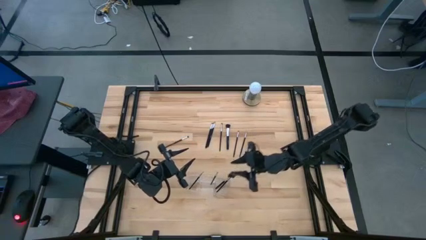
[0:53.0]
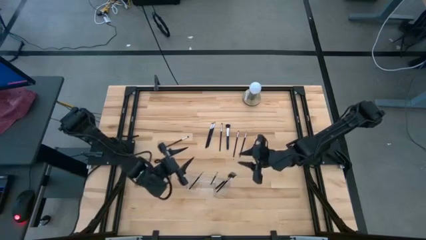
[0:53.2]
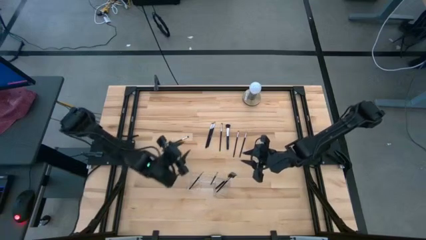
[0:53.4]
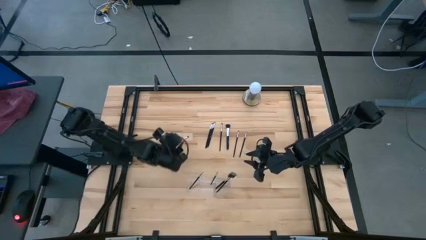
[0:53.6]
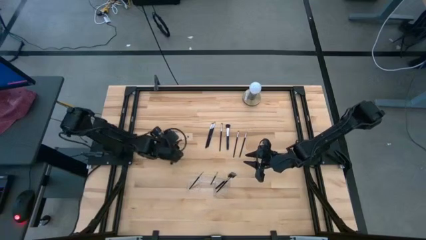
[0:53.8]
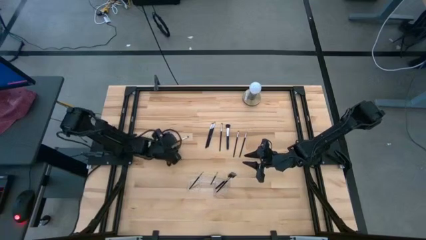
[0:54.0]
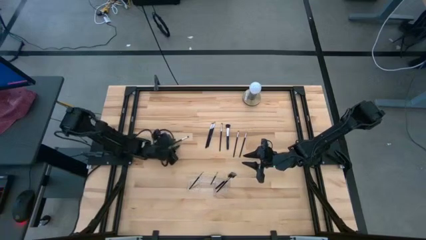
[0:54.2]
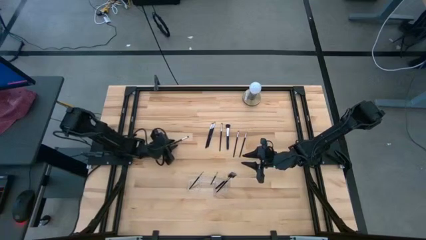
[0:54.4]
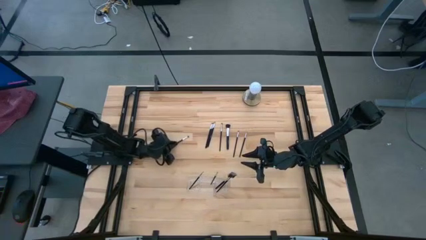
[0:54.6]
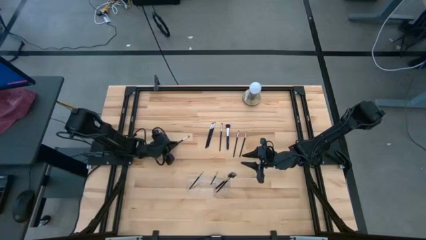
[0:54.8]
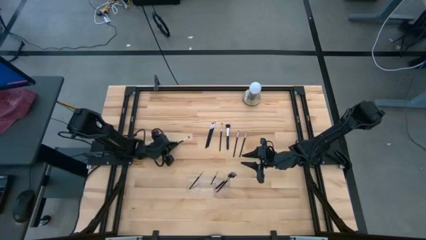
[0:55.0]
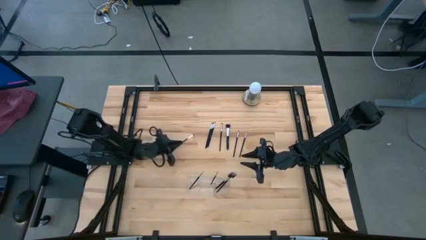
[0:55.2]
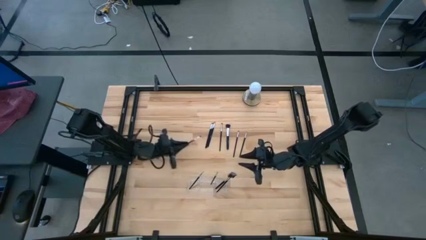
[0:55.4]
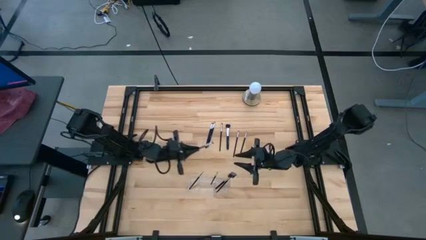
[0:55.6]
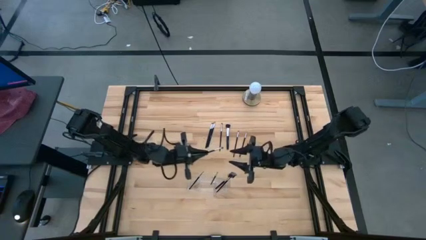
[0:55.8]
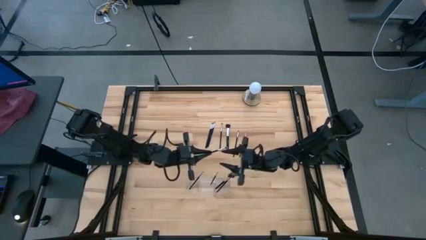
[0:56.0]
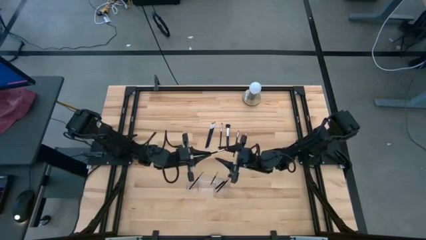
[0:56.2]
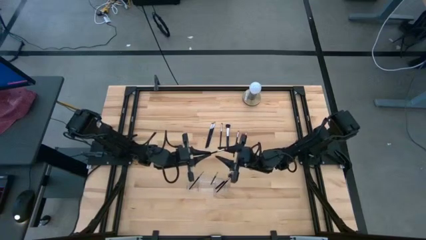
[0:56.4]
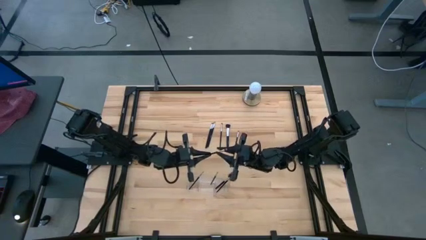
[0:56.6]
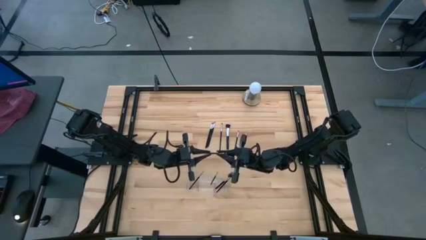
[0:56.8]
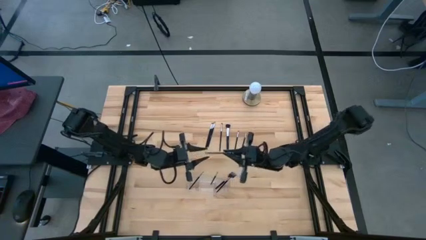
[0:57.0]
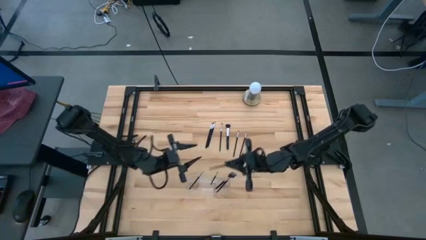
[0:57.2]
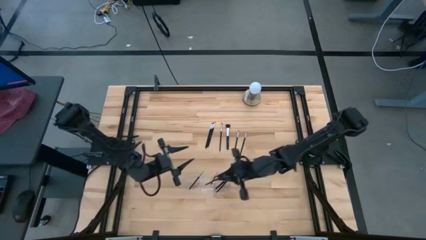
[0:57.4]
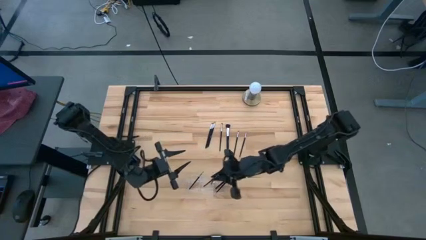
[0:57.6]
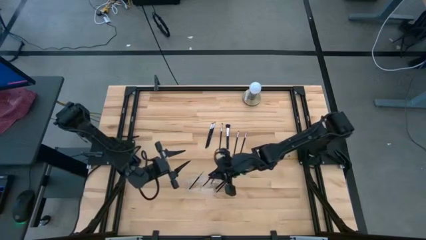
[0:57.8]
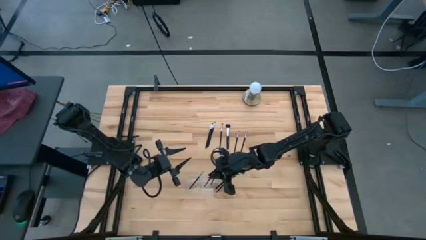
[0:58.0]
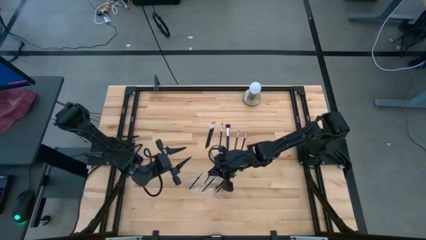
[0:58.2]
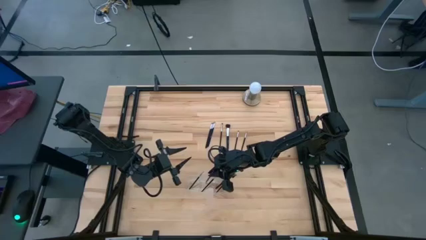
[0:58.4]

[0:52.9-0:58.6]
Task: Put items in baskets/containers
Put the black eyeshadow brush into the transparent organizer

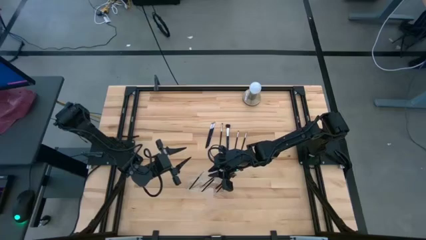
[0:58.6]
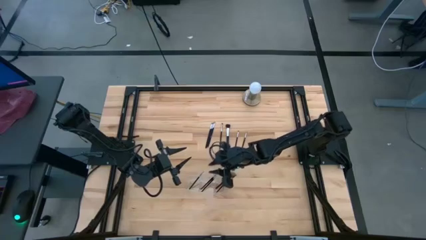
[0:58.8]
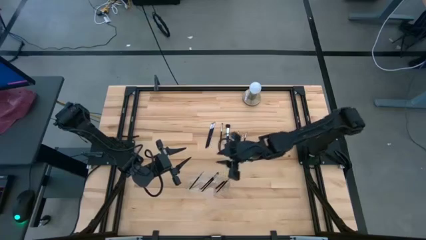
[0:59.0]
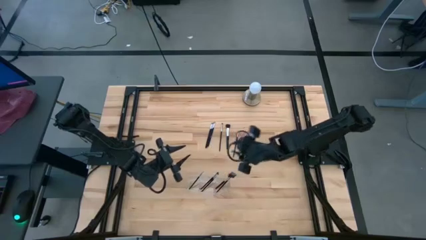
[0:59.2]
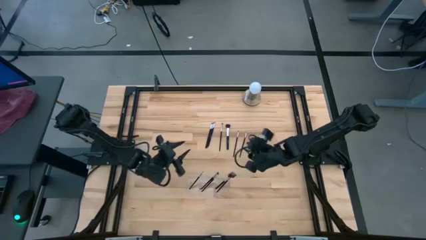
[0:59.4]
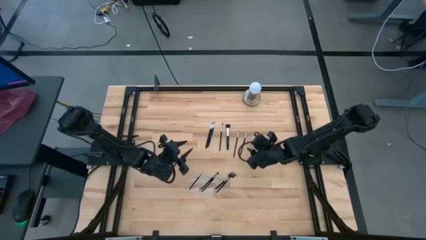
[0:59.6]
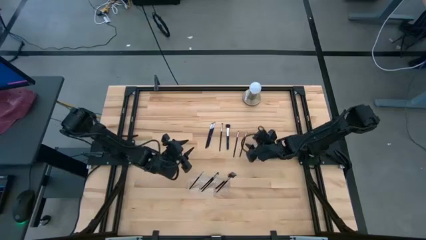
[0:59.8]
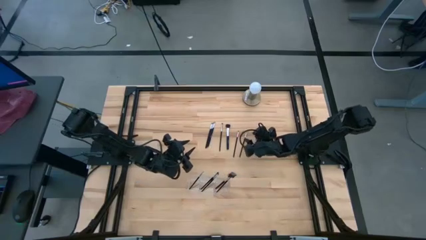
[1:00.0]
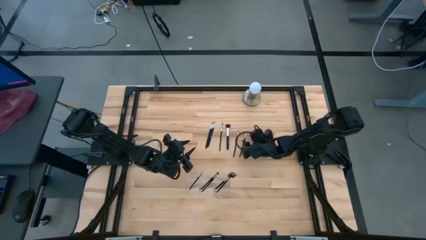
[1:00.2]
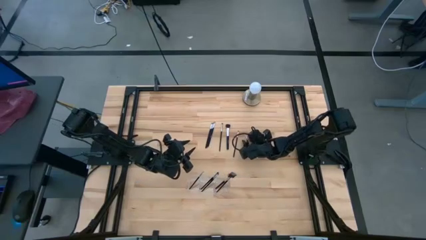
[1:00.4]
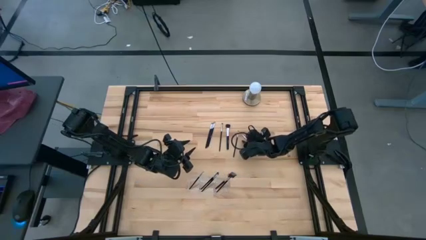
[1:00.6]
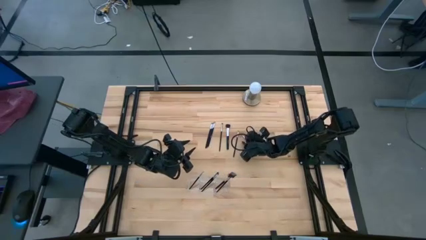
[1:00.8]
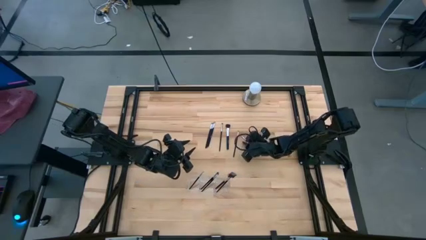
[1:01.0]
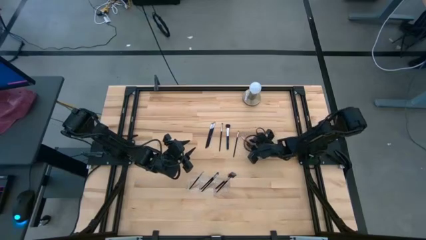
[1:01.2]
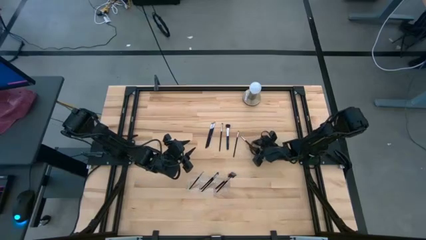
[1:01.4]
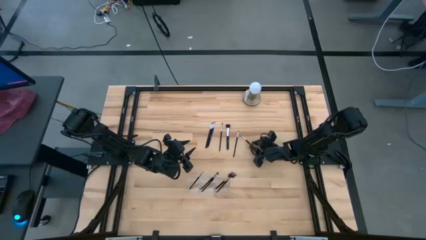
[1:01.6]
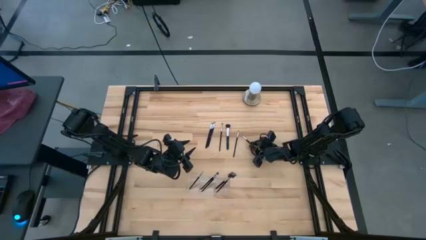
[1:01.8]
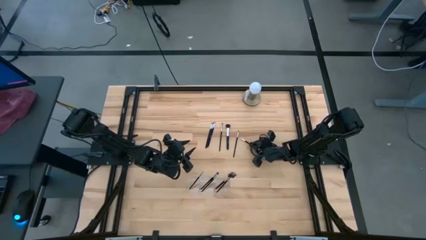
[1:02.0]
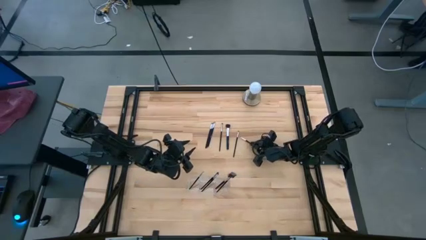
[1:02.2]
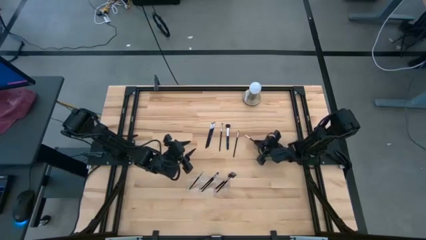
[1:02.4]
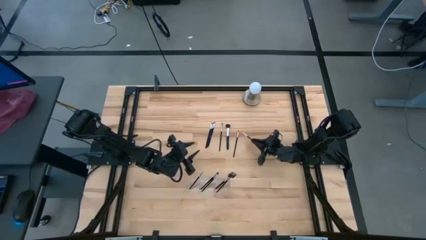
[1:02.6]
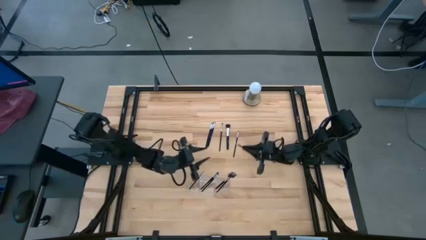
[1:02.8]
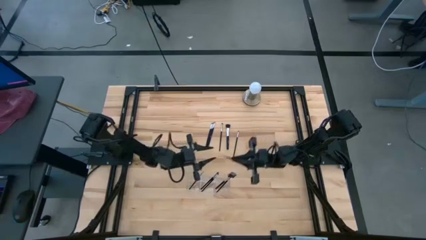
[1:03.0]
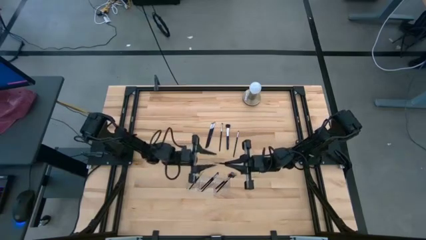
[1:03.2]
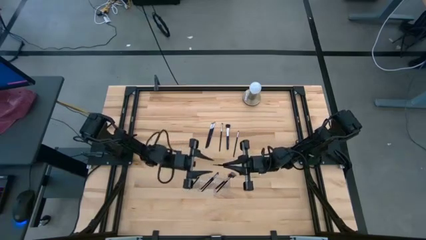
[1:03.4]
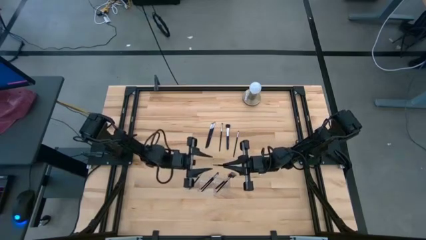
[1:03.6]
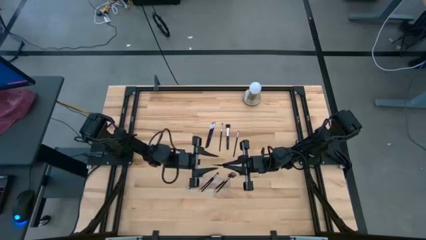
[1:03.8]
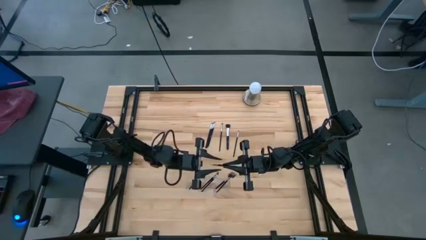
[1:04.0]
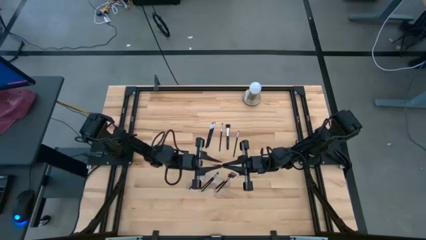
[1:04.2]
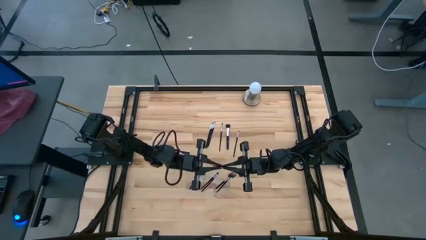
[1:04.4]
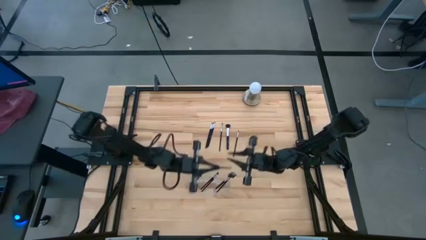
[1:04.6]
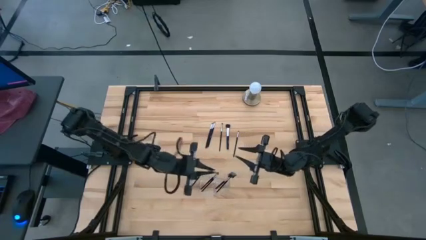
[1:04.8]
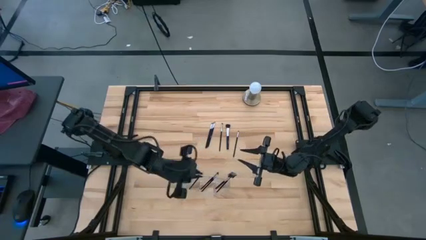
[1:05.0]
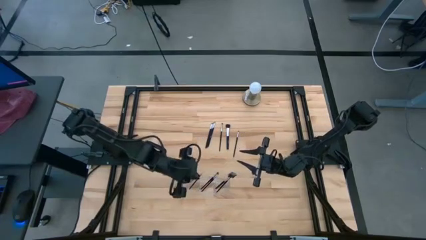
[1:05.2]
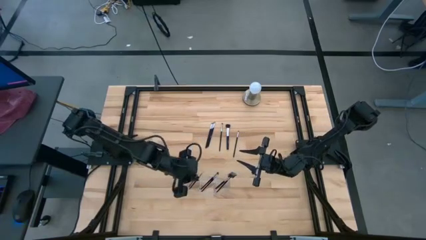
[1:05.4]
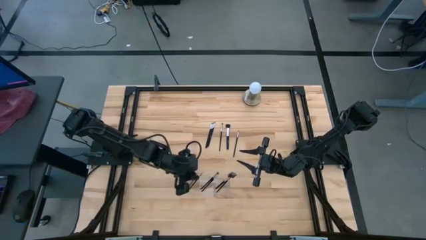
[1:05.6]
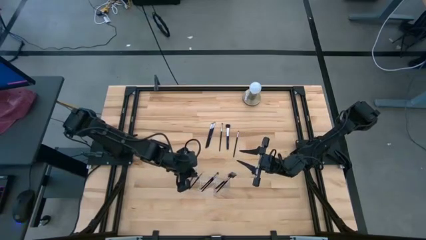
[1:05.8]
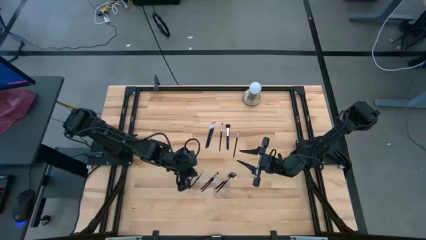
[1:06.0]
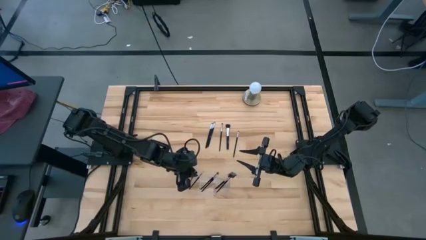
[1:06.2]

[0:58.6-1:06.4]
Put the black liner brush into the transparent organizer

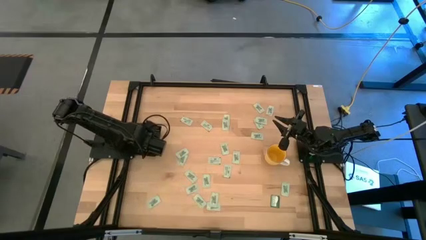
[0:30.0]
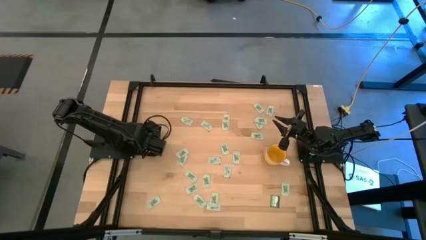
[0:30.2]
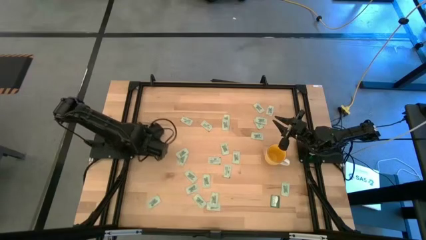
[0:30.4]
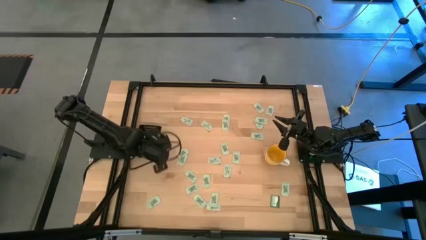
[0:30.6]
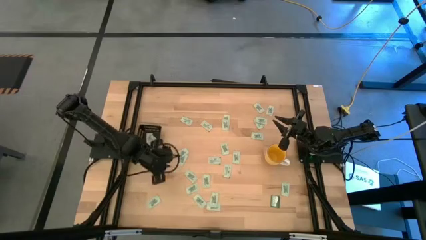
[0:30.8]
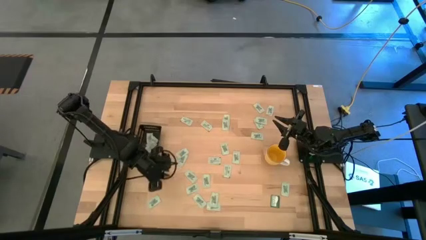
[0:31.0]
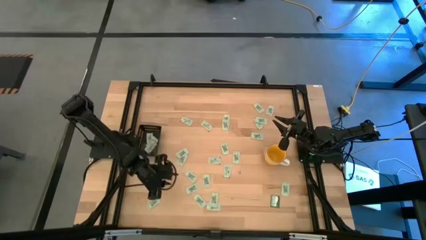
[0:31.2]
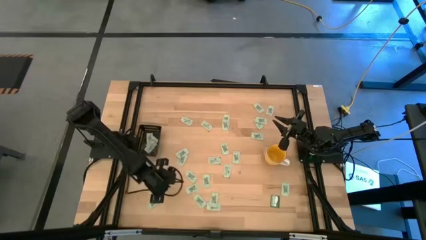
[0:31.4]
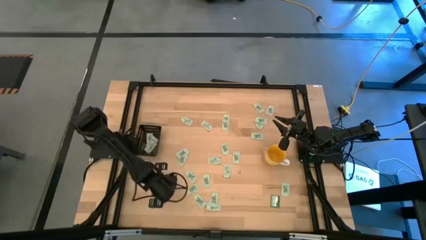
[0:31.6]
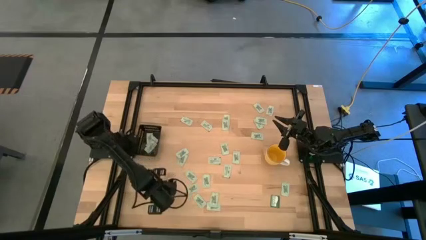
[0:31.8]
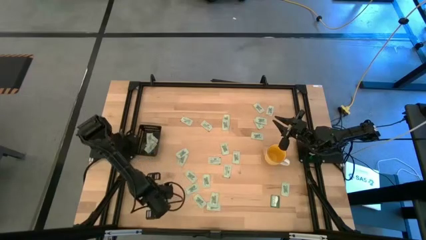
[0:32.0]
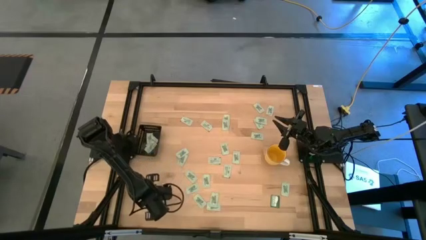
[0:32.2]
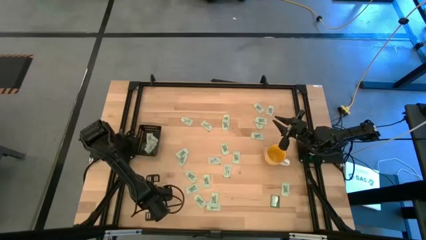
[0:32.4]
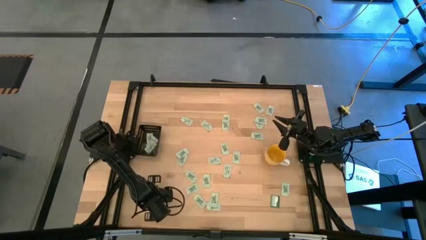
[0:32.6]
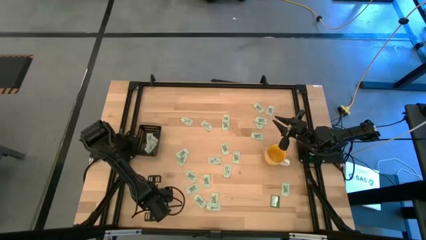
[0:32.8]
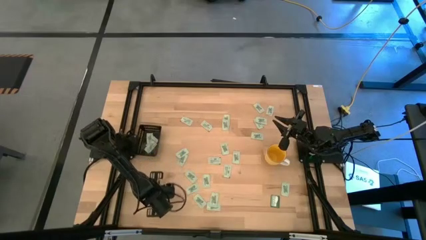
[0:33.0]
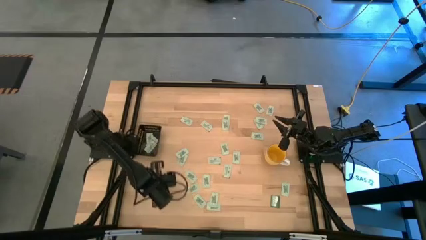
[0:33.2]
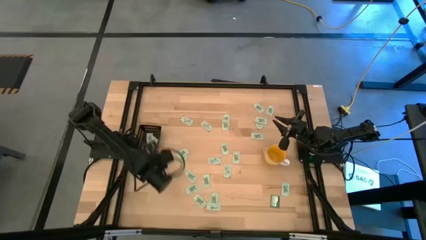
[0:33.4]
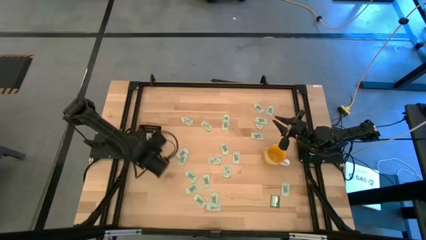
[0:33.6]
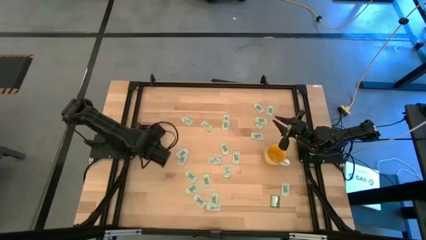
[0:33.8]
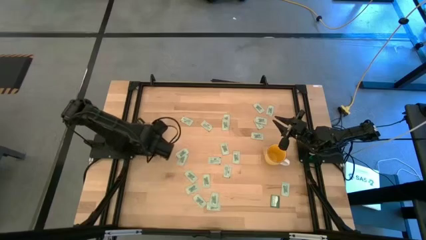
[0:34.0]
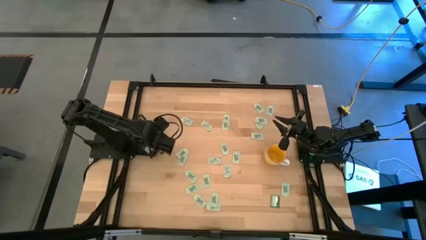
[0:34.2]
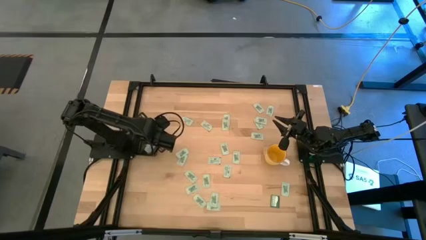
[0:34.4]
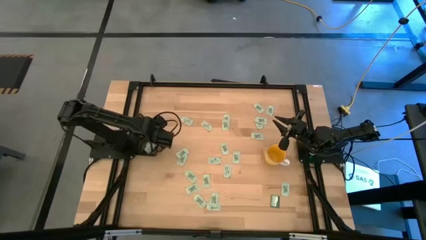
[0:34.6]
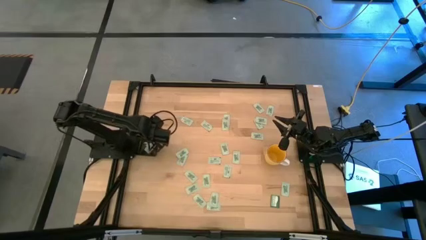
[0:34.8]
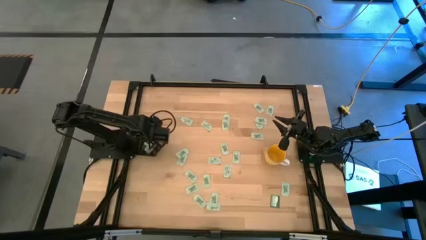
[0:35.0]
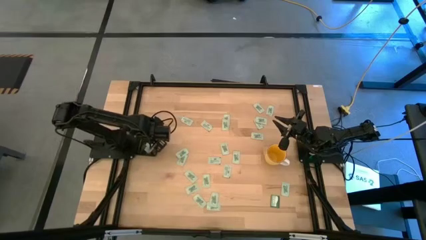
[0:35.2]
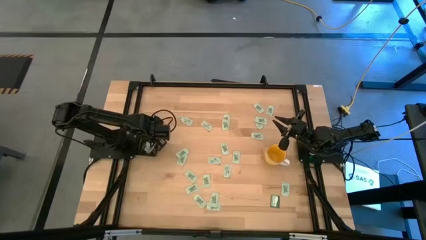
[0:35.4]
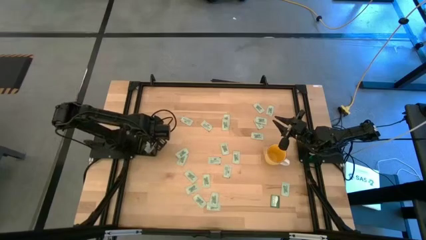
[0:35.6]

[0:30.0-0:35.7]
Task: Pick and place Stevia / Truvia into bins
Put the stevia packet into the black bin
